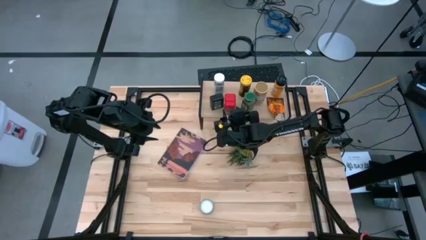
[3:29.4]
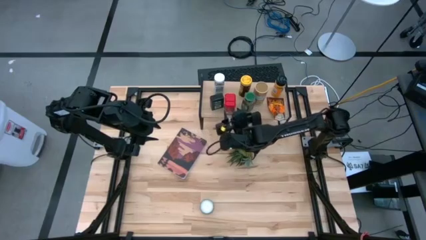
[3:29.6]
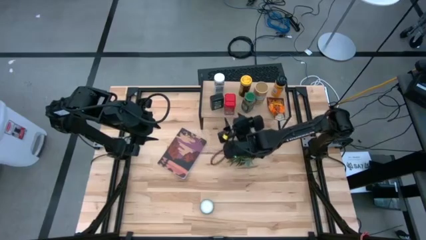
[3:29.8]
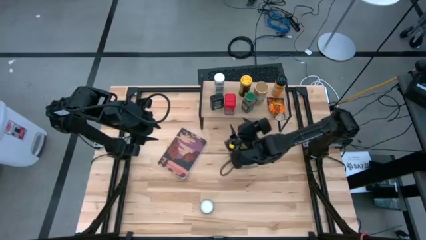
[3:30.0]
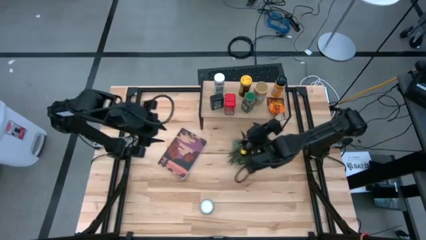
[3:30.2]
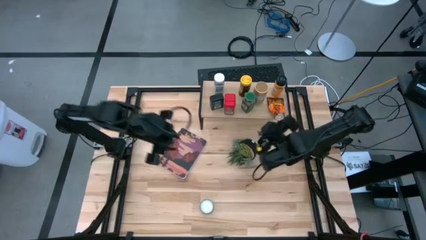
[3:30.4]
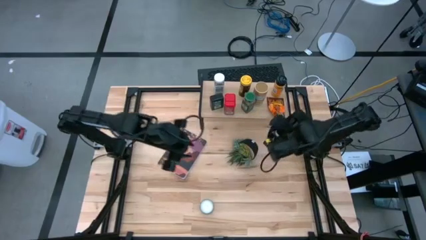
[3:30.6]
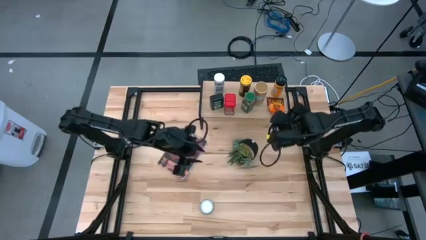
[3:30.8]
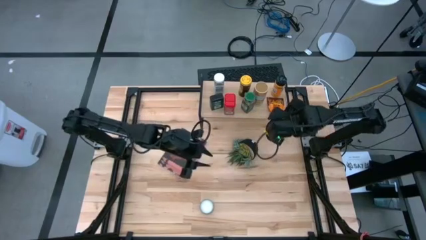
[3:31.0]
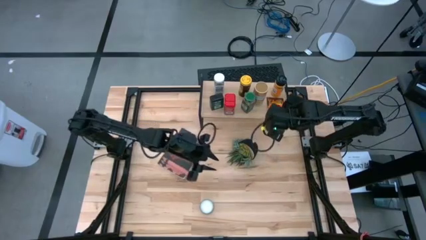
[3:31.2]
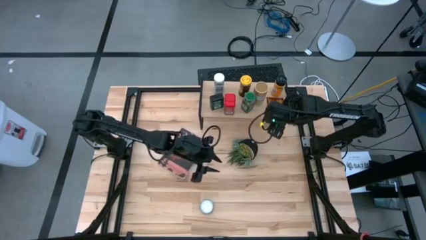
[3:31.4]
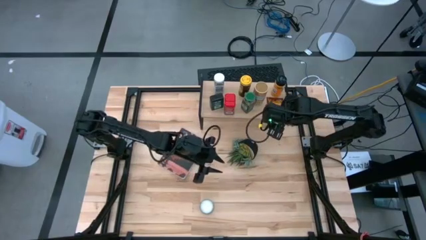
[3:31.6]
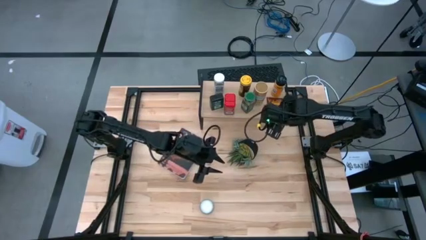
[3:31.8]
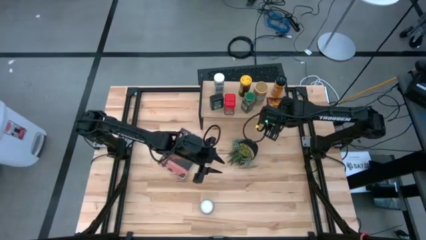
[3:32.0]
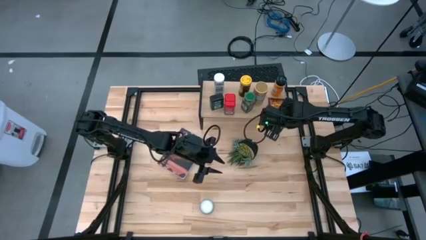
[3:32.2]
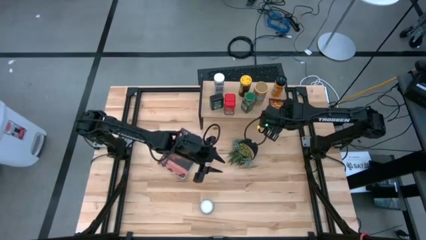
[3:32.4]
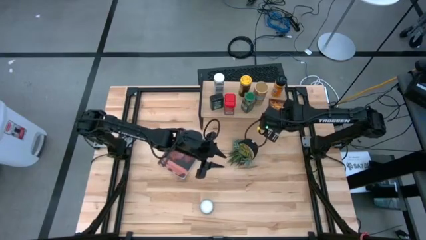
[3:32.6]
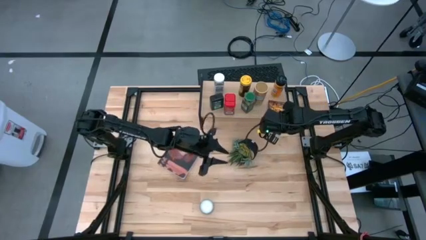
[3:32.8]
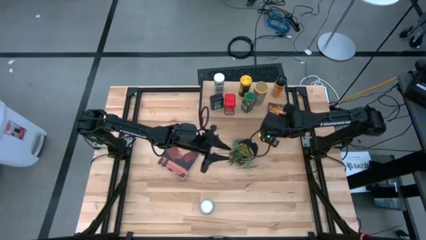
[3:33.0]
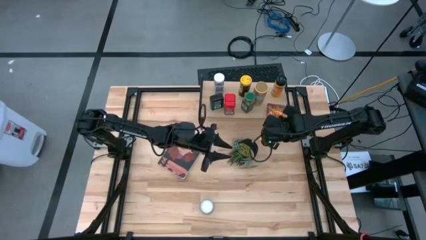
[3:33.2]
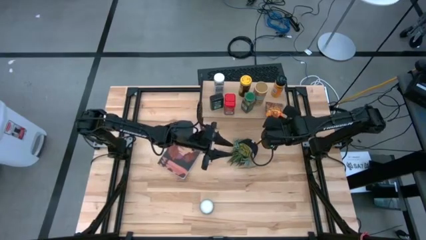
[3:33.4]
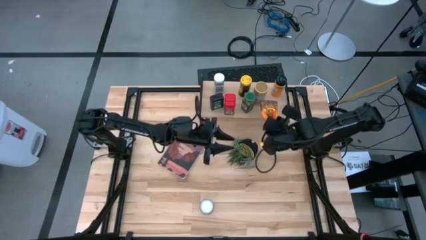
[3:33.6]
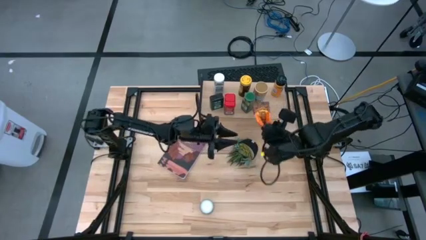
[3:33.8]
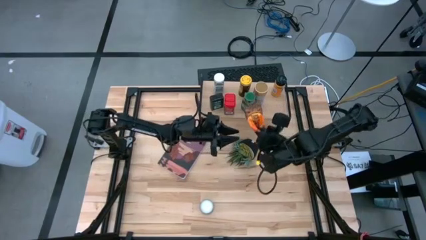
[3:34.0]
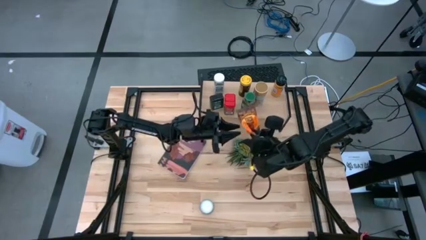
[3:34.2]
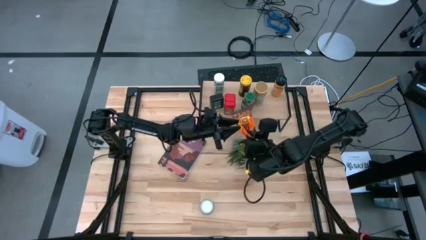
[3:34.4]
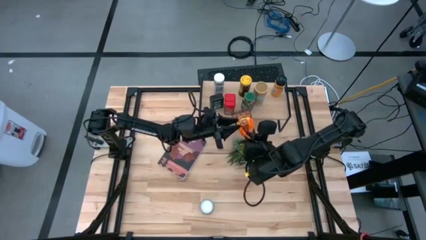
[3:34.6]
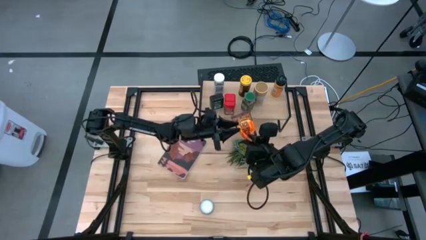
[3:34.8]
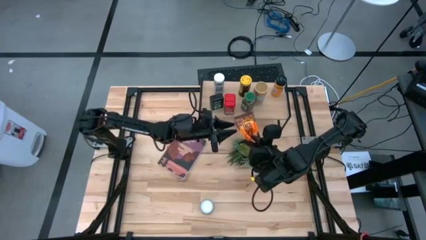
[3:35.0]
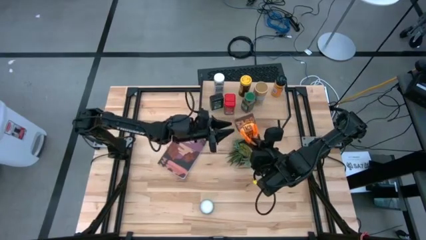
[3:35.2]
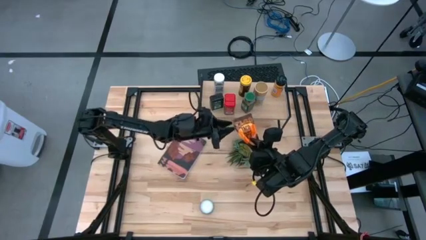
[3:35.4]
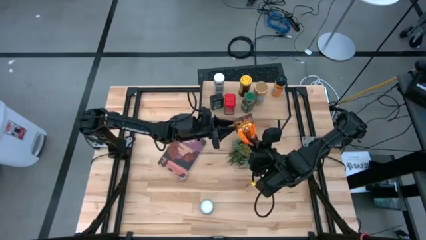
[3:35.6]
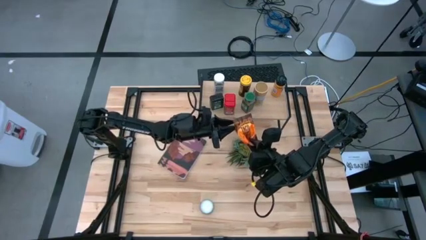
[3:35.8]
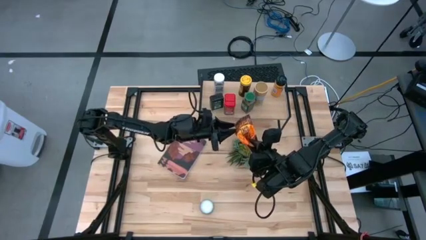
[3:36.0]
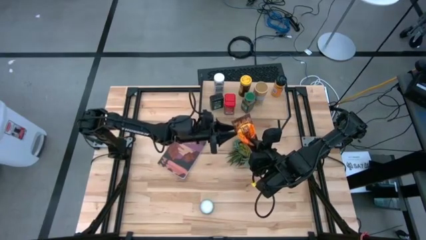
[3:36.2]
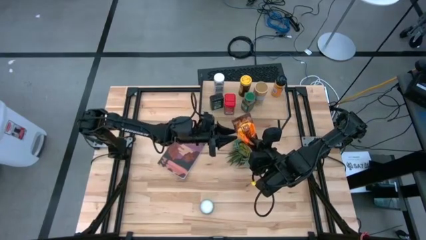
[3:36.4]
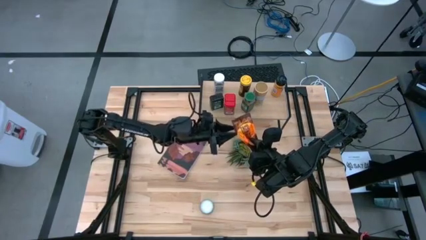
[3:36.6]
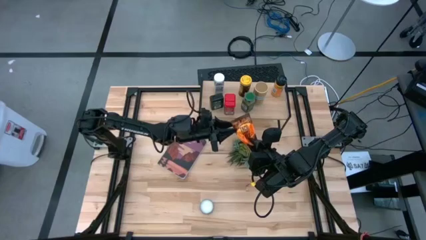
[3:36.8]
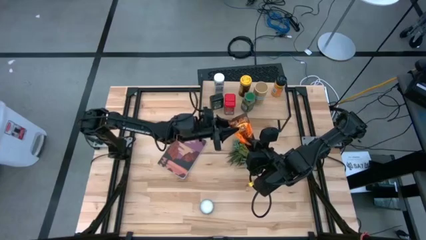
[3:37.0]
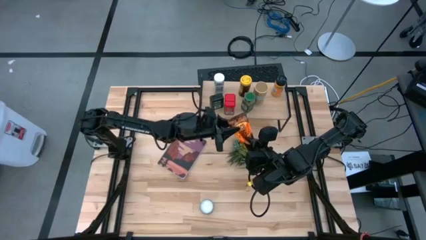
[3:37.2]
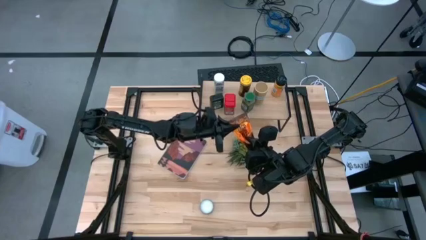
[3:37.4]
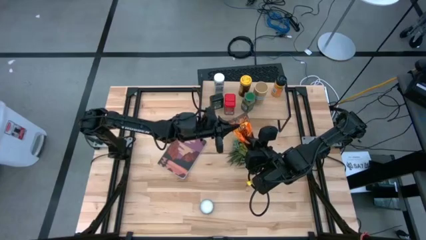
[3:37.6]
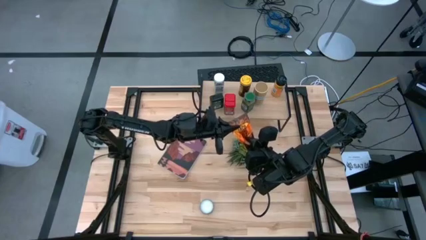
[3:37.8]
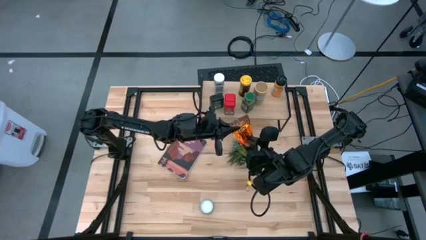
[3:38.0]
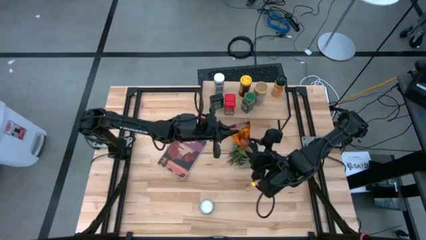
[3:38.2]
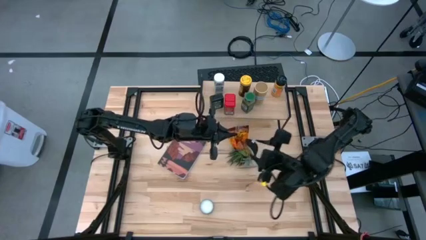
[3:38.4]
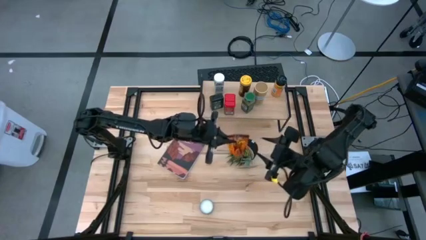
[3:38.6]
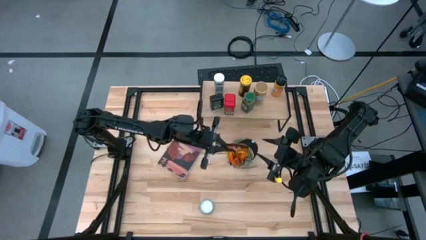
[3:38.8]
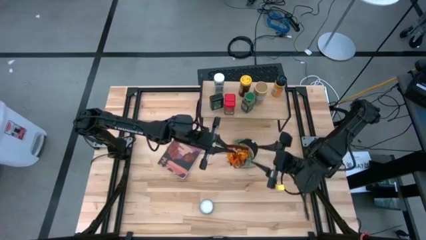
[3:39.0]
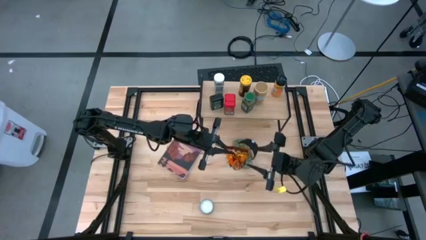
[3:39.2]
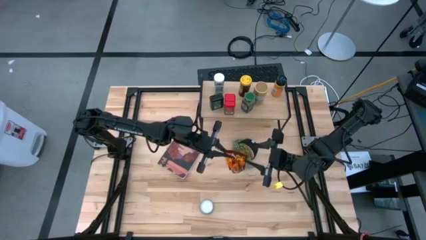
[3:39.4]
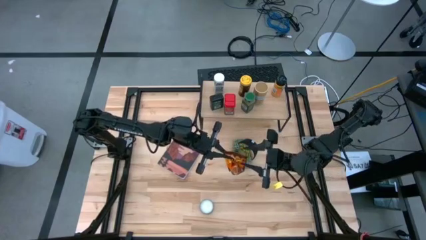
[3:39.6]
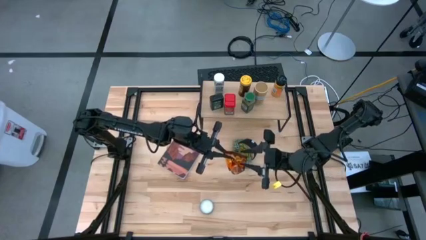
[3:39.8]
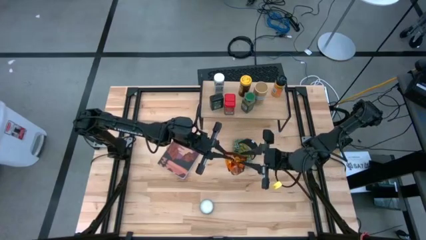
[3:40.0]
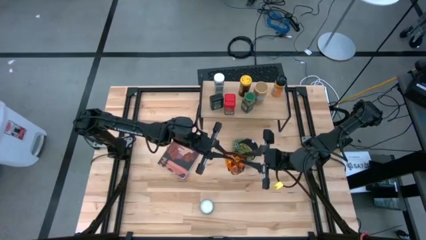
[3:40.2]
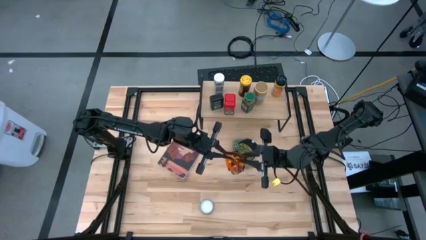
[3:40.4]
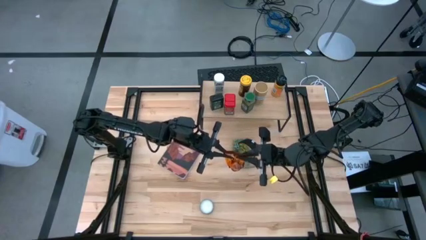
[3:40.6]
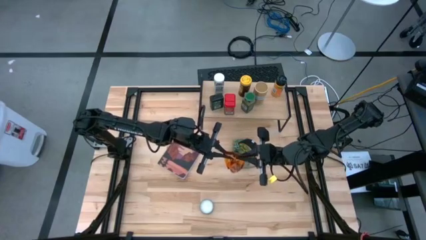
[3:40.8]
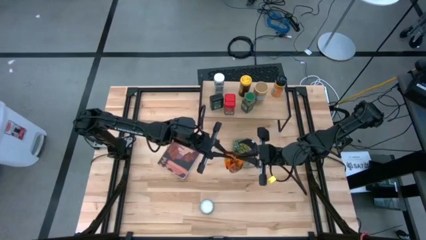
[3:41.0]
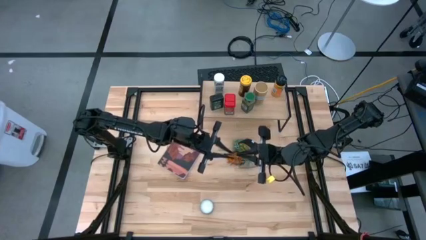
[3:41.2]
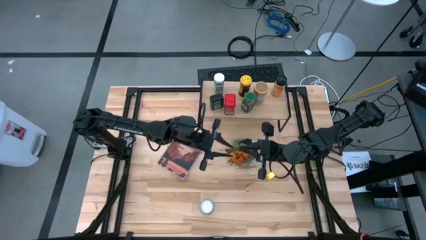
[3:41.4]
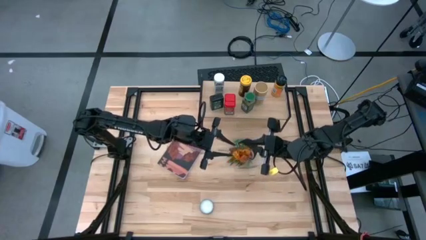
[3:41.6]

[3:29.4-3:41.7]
Task: Shelf spices
Put the orange seasoning bag on the shelf

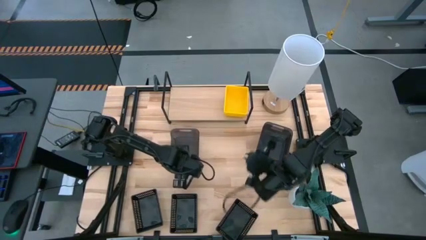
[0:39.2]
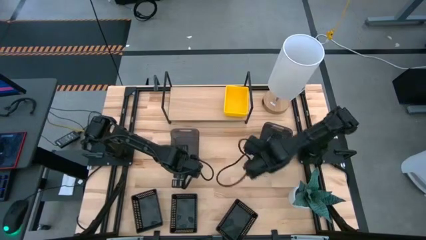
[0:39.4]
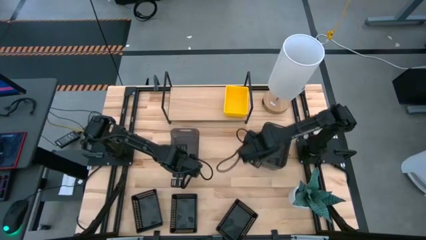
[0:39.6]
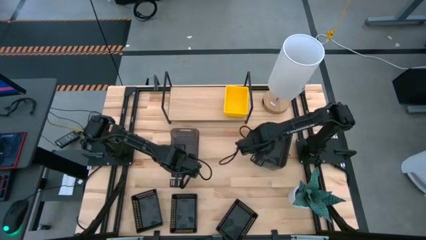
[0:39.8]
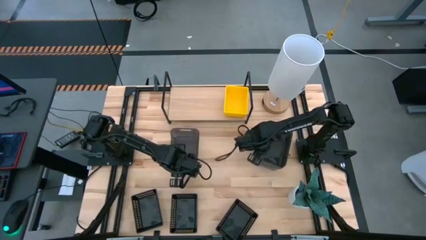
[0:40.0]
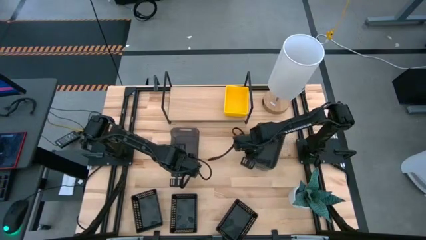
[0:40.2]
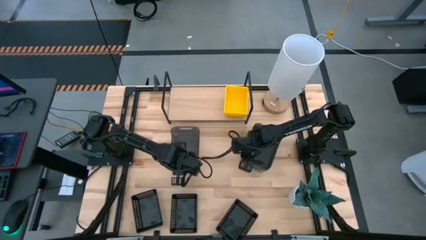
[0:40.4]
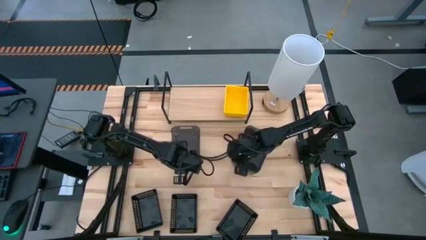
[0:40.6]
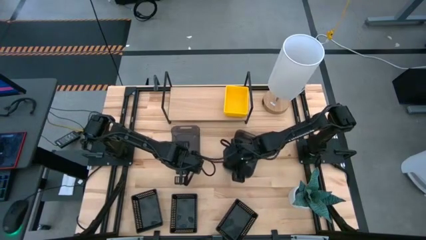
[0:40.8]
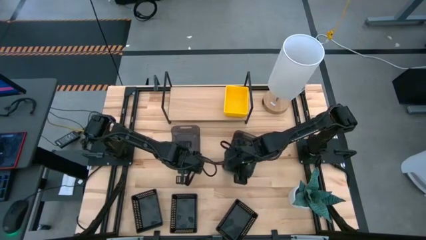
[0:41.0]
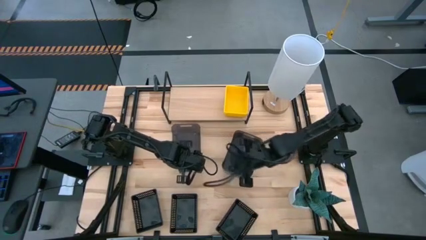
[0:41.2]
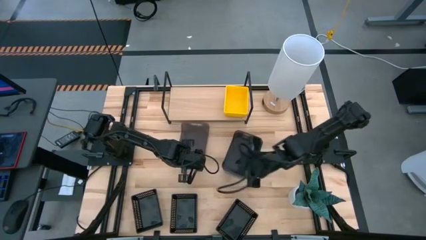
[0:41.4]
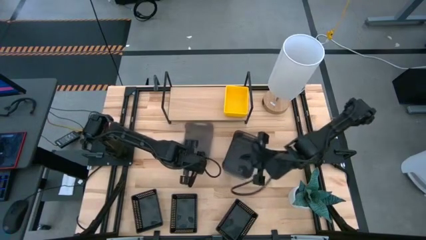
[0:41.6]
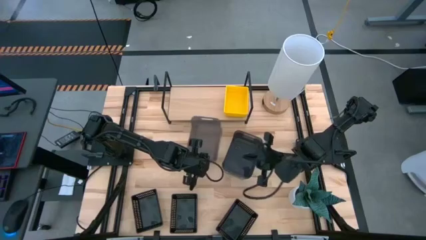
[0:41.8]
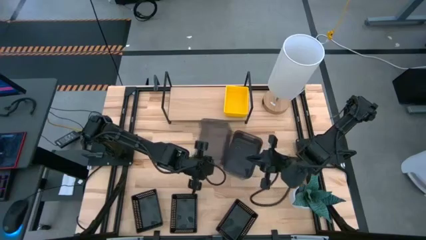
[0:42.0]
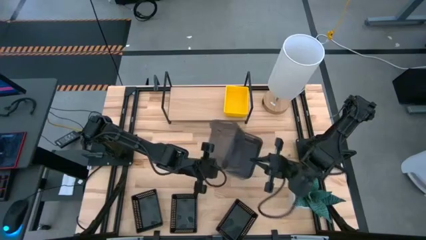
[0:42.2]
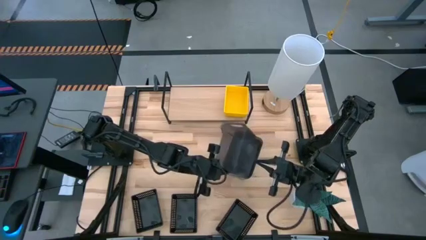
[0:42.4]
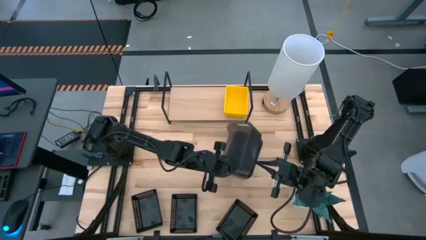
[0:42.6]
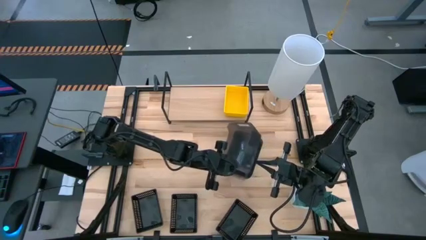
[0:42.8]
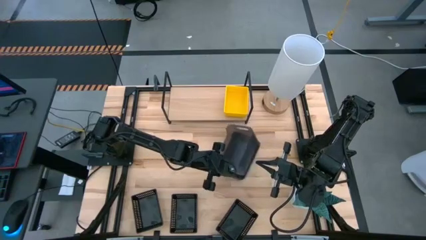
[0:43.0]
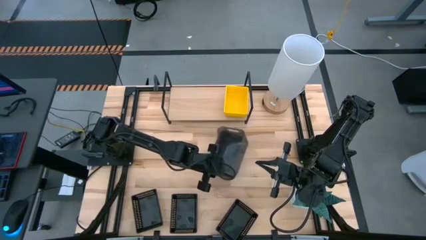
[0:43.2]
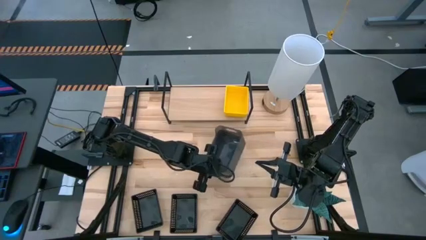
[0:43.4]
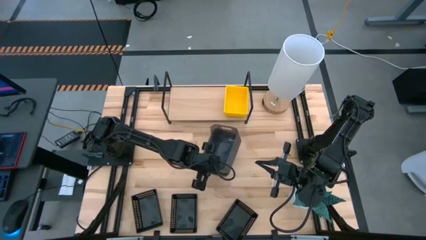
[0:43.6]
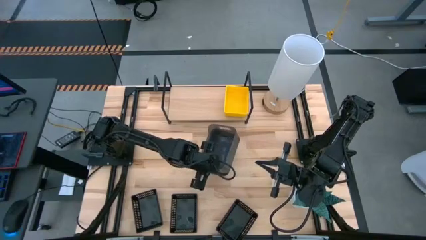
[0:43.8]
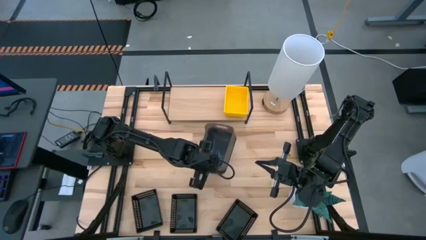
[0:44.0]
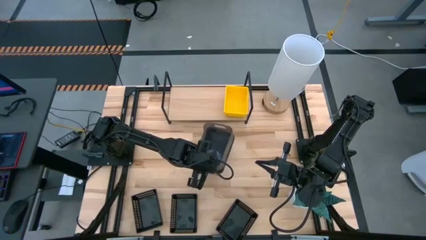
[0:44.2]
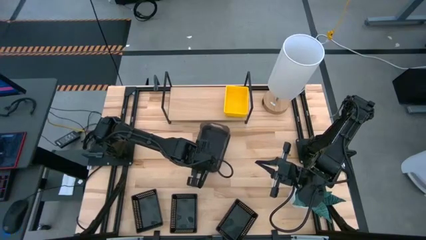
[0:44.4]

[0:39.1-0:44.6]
Task: Stack baskets on shelf by color
Stack the left black bin on the black bin
